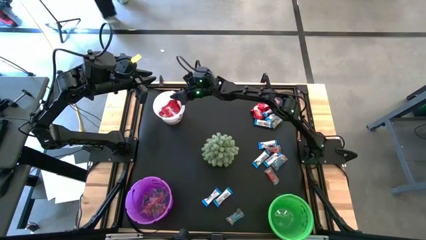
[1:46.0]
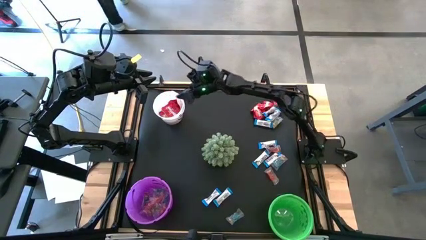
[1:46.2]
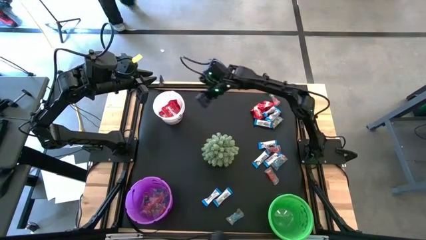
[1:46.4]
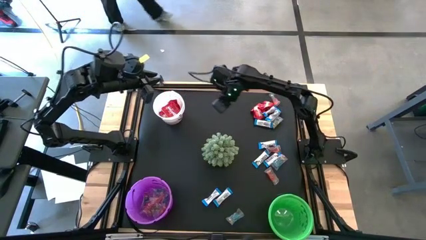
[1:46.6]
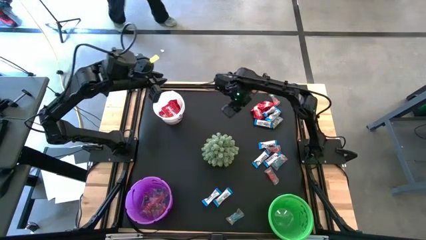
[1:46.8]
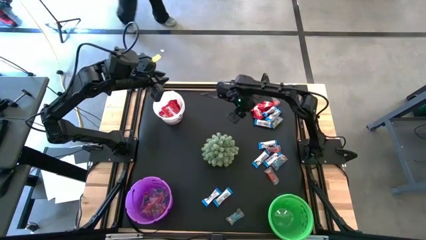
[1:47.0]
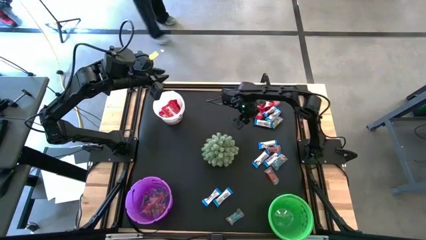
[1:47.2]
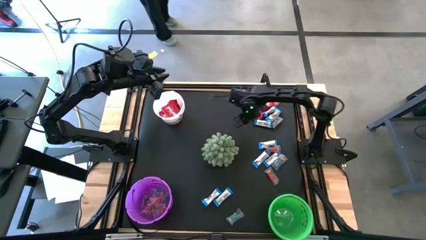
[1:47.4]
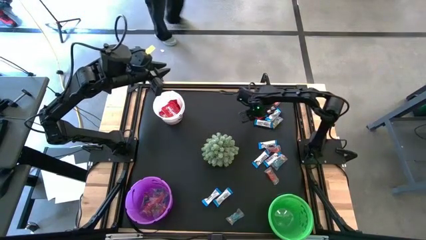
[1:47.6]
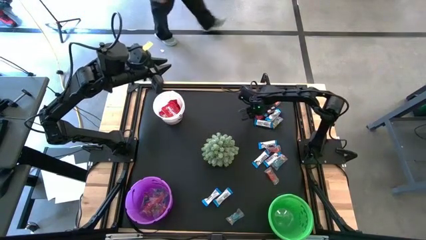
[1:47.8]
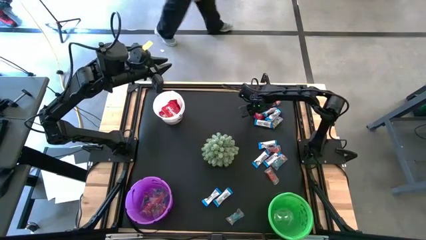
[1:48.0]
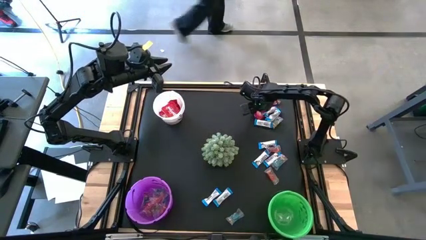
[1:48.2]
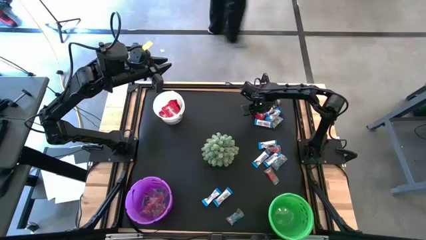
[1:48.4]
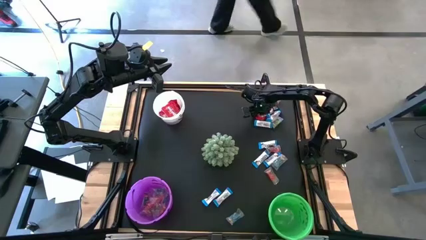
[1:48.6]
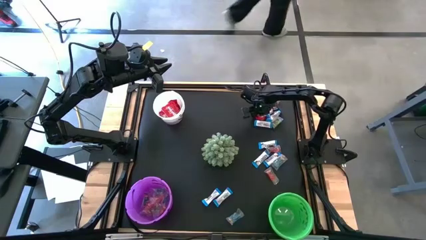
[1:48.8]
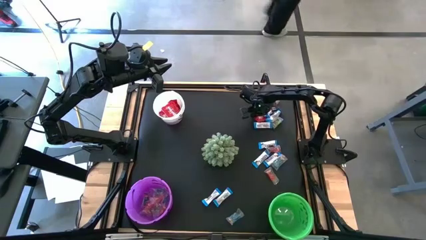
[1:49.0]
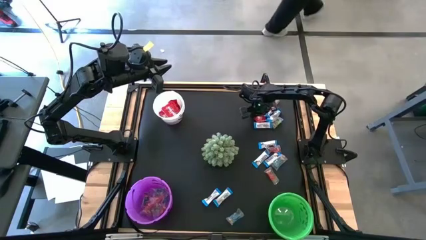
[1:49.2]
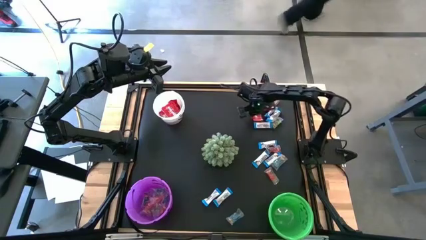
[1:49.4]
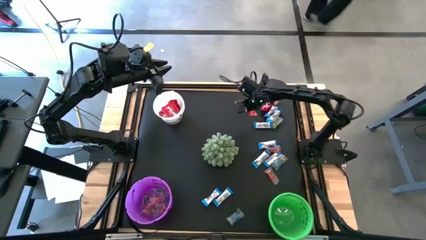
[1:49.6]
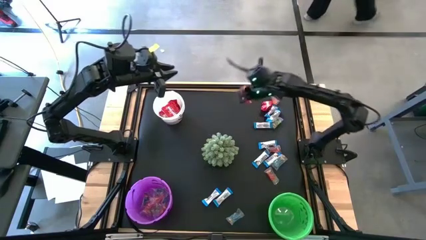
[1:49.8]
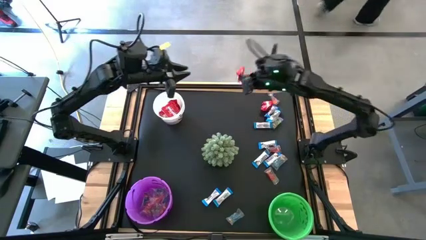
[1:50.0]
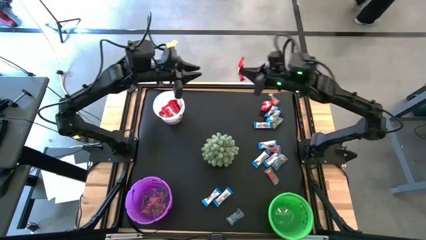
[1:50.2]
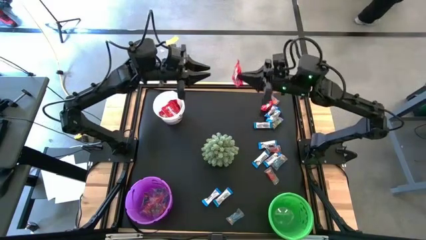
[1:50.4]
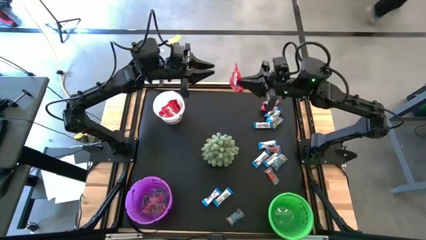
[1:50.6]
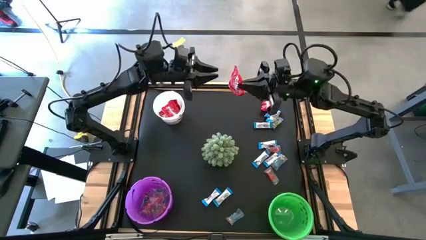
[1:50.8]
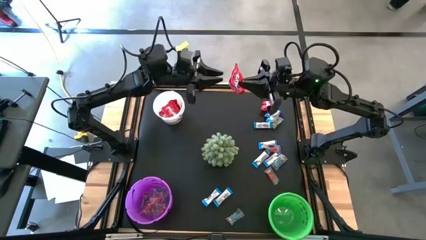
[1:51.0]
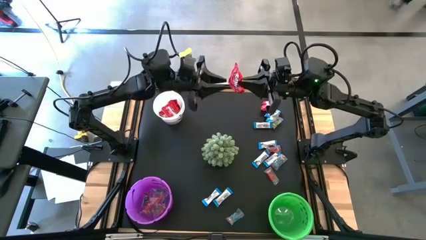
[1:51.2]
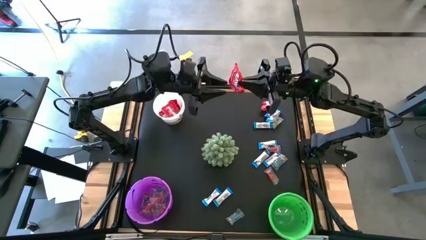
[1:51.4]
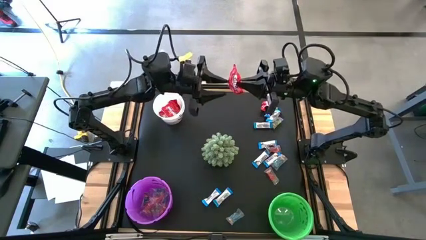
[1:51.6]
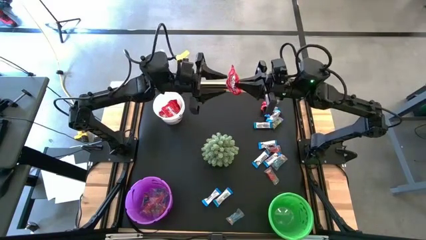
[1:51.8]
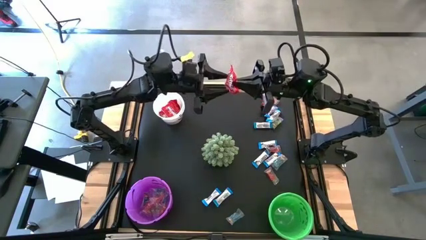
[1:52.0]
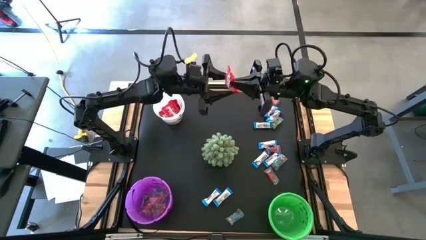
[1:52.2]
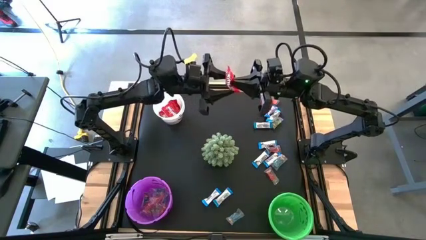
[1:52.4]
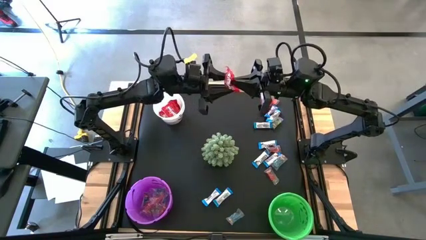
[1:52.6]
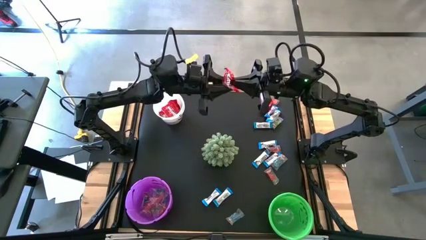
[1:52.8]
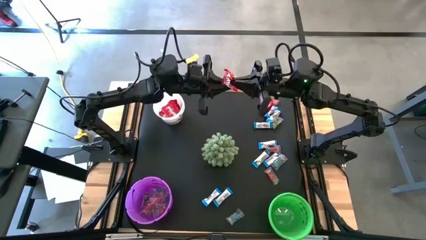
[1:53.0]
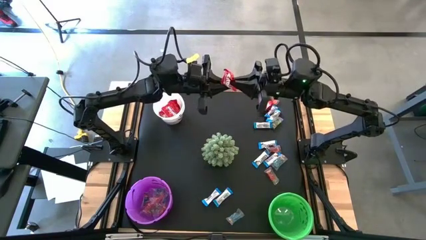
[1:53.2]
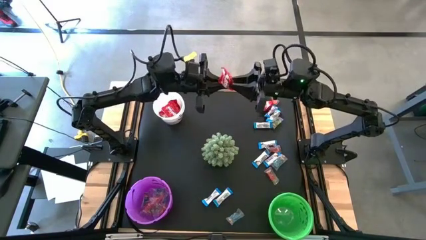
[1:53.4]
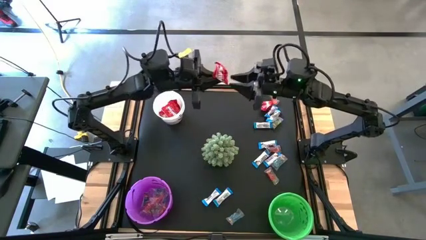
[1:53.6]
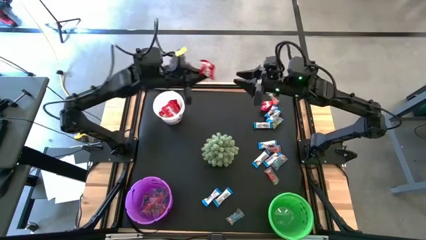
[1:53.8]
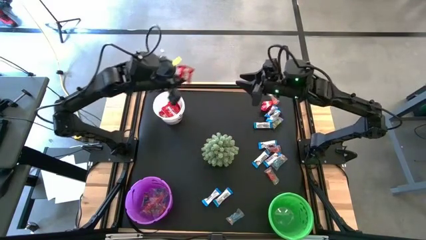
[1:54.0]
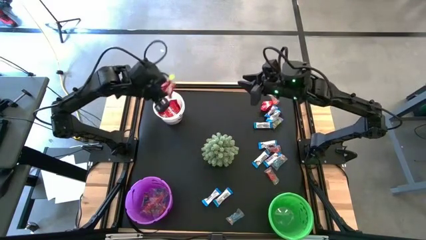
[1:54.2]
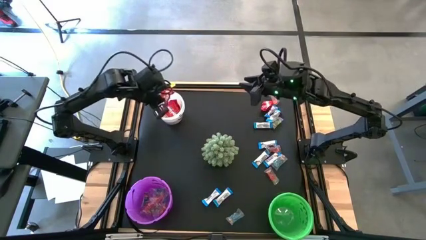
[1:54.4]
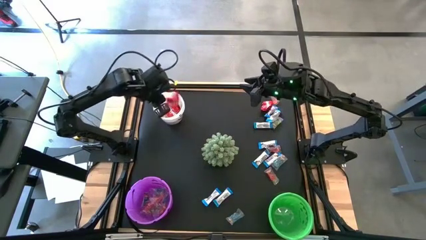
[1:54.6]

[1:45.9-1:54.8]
Task: Organize candy in baskets
Put the red candy into the white bucket

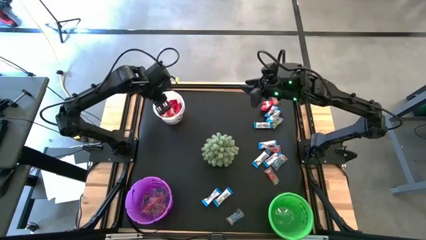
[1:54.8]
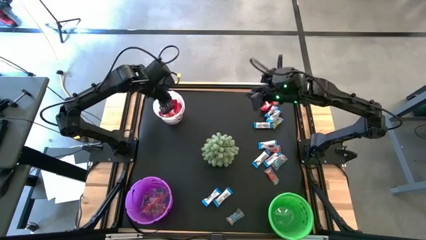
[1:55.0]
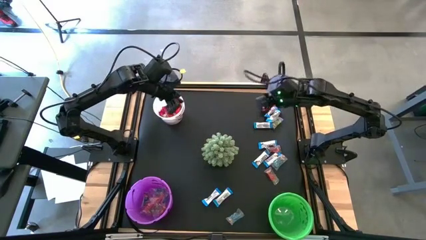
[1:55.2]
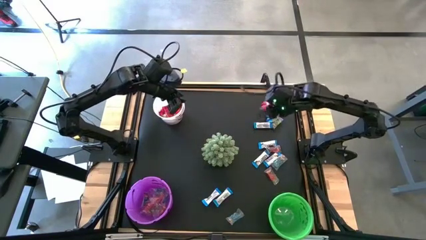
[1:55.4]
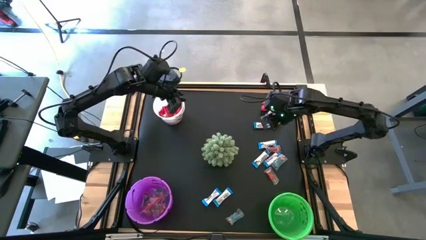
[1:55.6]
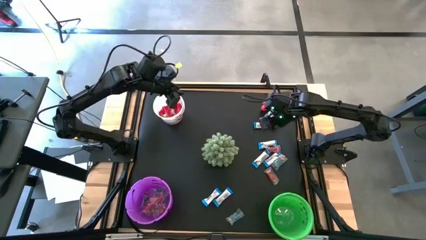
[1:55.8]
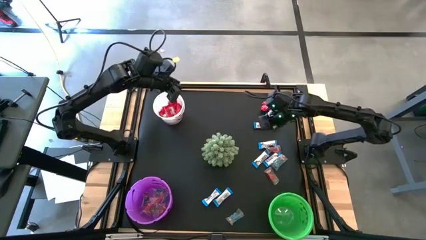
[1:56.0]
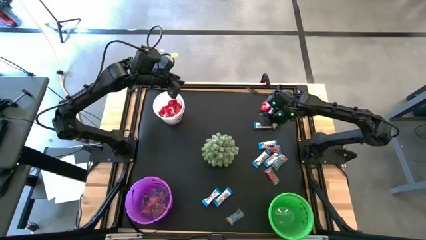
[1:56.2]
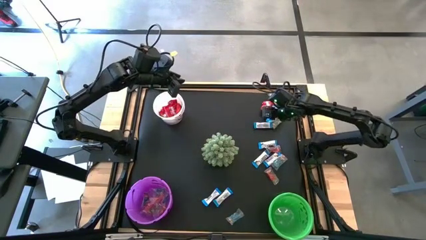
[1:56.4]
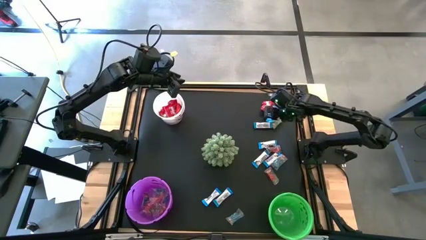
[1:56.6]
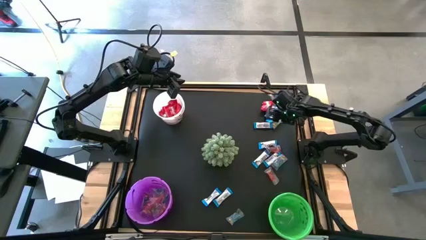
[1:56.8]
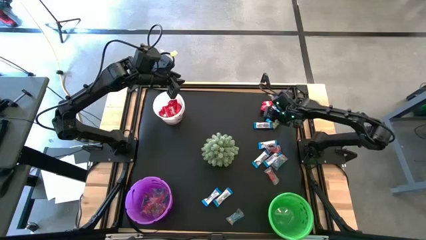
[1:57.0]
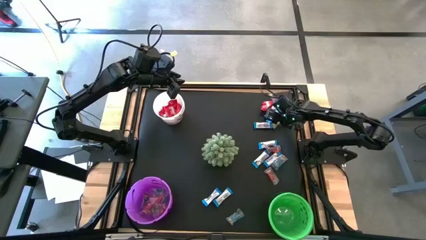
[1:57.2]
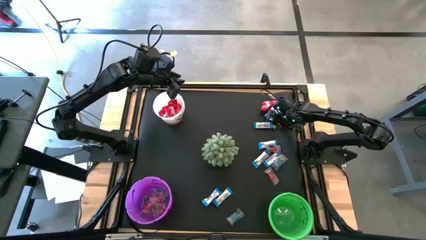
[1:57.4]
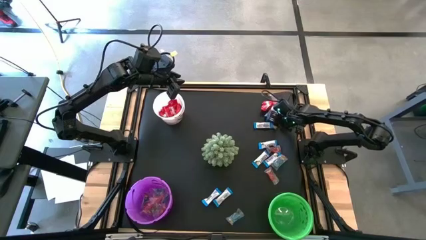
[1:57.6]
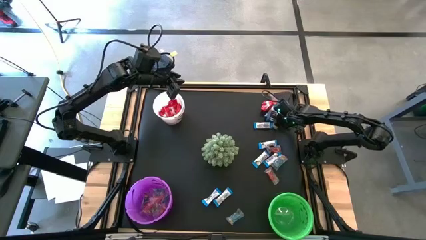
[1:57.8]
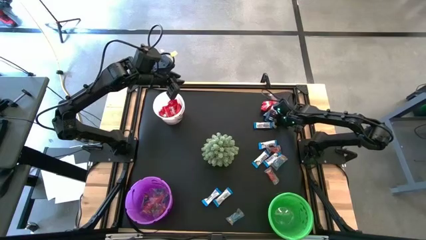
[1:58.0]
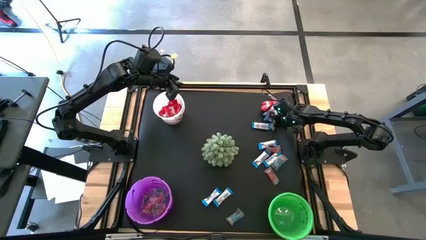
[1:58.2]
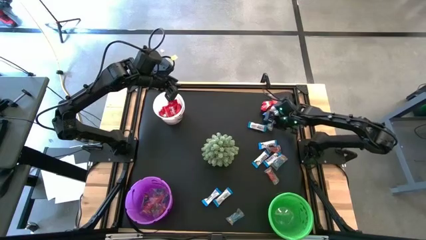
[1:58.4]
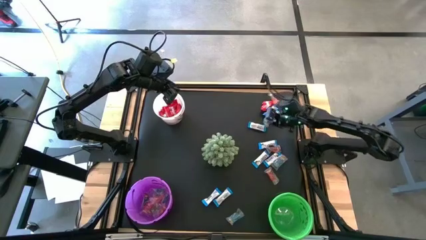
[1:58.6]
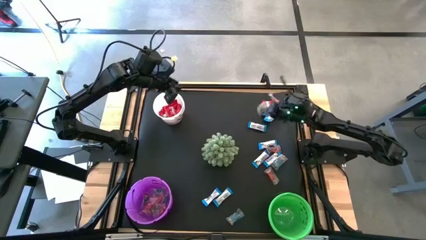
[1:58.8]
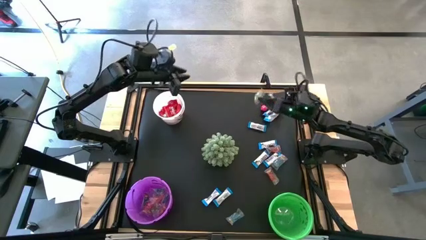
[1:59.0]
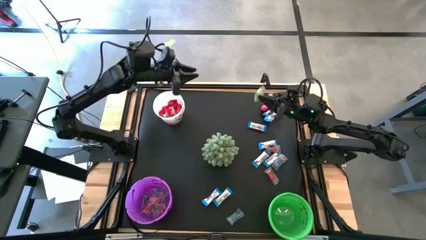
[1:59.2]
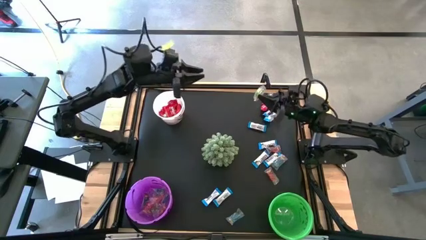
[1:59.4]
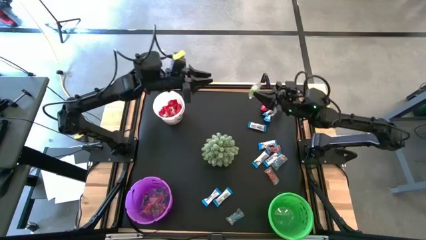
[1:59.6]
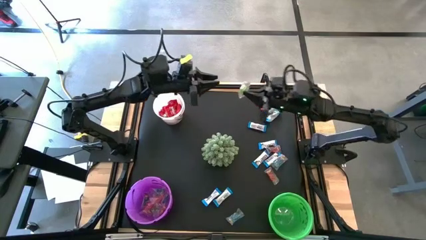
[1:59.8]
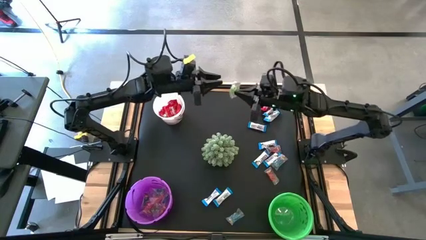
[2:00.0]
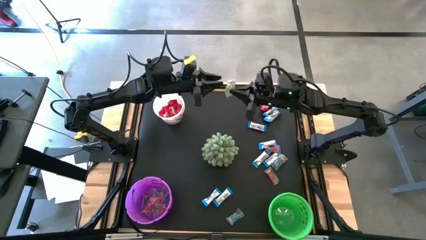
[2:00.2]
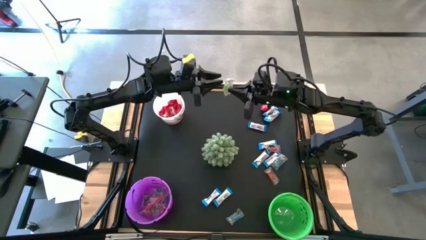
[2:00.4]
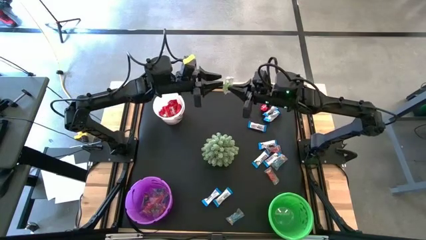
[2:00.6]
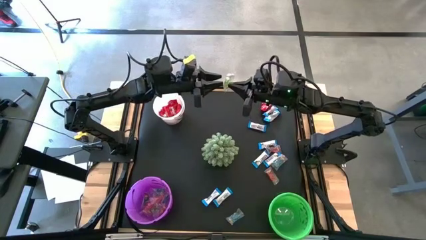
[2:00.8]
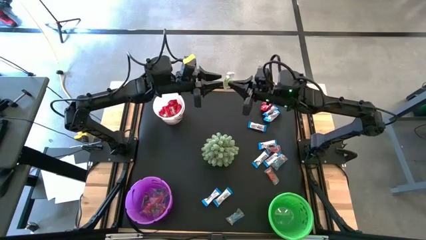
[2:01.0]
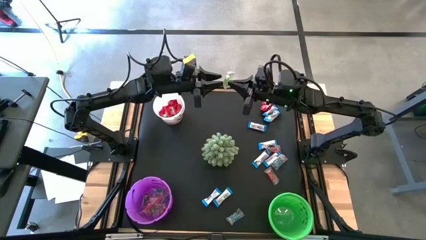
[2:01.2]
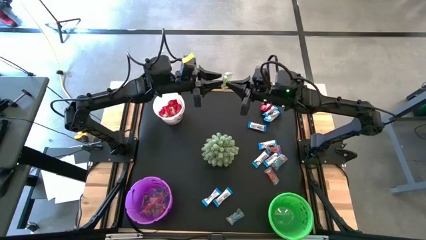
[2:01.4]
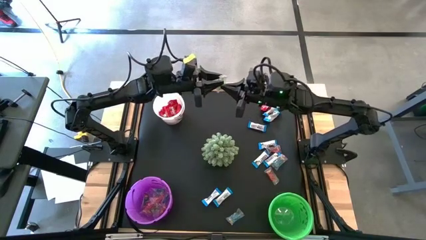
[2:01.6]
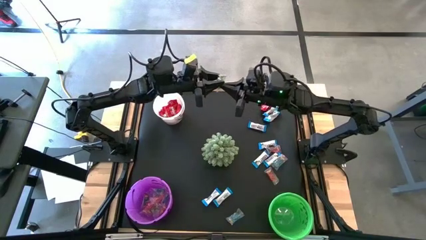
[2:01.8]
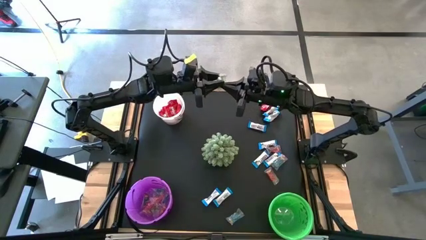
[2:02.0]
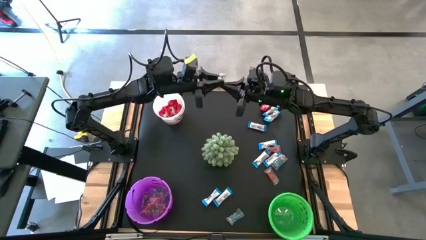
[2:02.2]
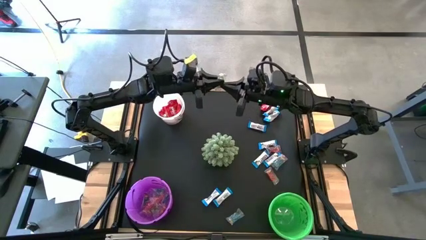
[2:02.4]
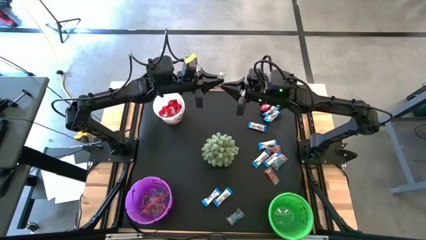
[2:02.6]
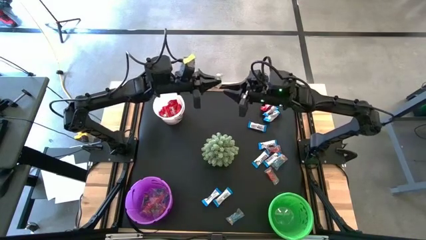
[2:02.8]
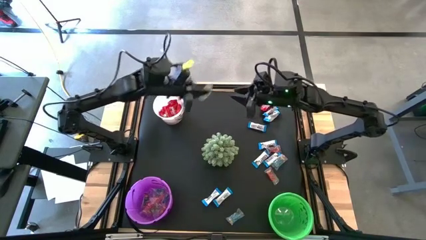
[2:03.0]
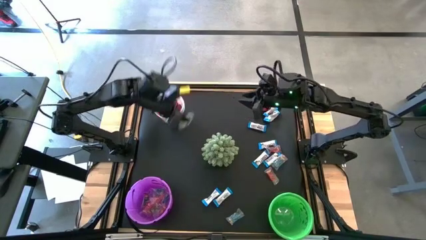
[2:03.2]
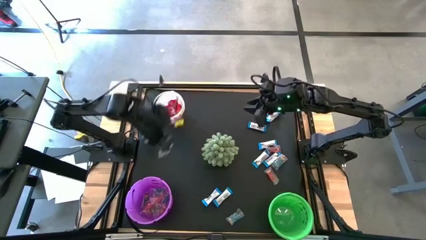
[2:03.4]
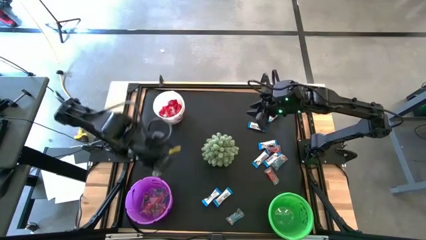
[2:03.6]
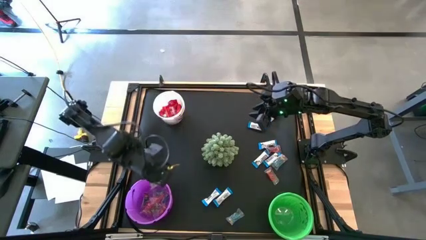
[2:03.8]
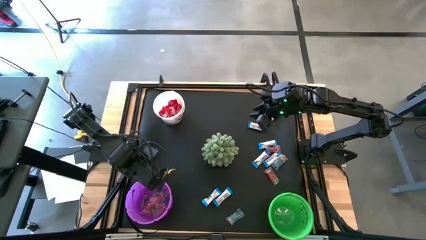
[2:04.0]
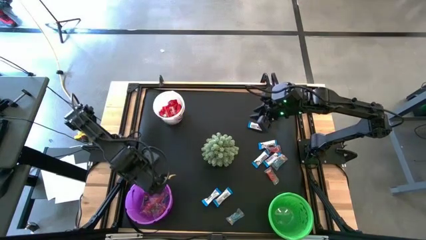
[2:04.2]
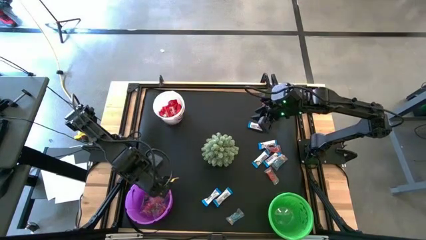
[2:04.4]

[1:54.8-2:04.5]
Put the green gummy into the purple bucket
